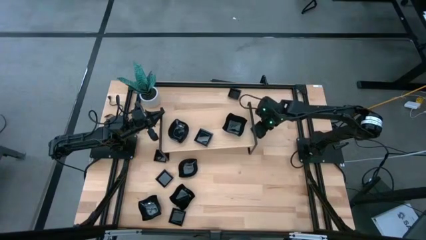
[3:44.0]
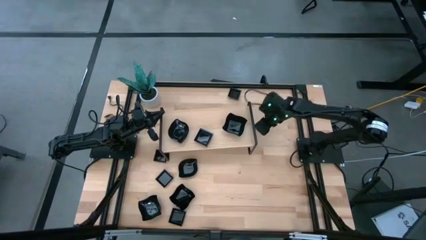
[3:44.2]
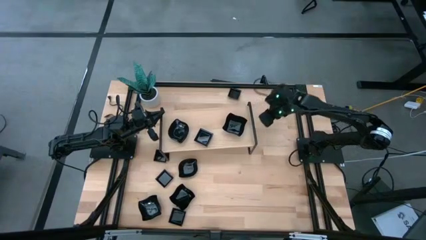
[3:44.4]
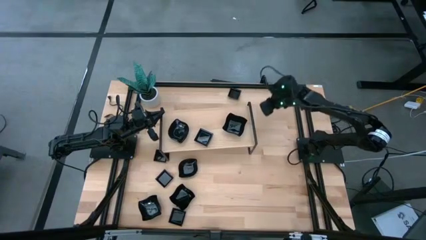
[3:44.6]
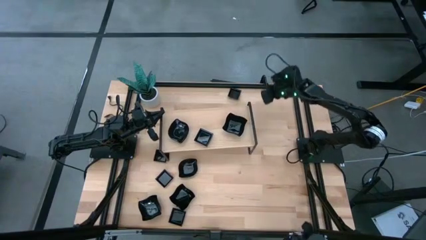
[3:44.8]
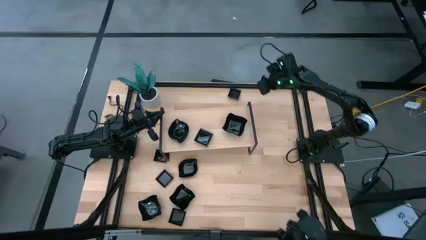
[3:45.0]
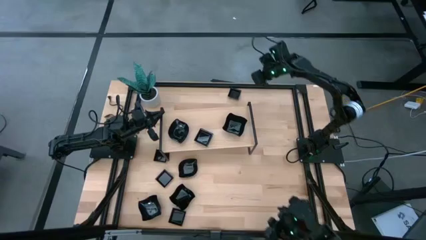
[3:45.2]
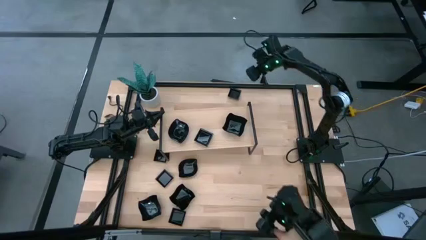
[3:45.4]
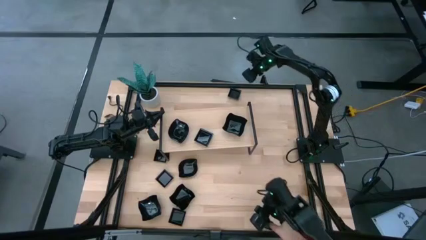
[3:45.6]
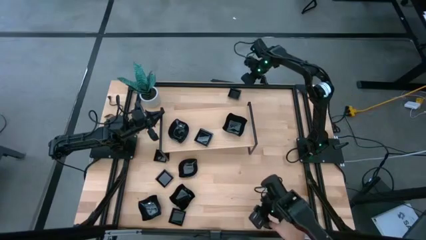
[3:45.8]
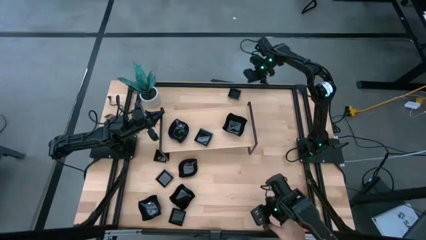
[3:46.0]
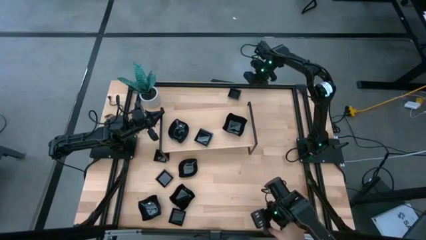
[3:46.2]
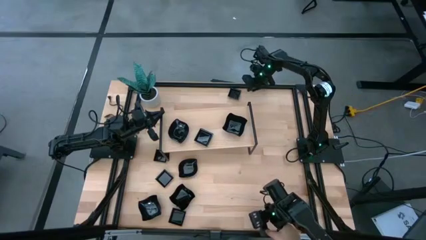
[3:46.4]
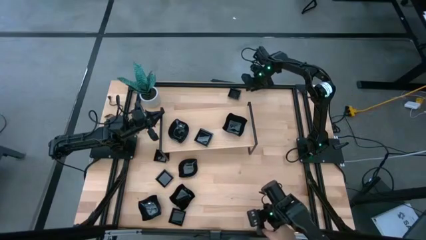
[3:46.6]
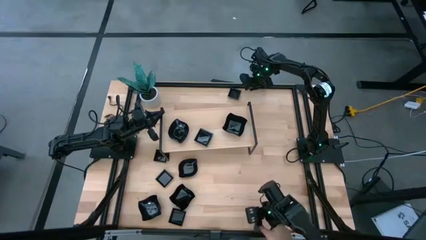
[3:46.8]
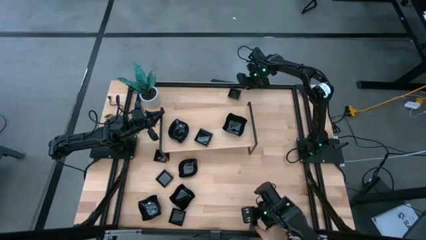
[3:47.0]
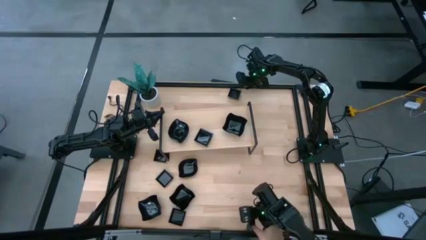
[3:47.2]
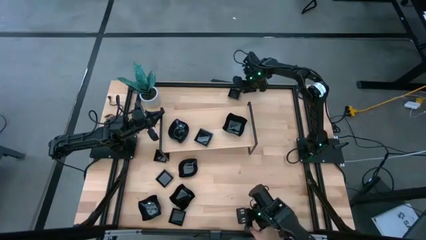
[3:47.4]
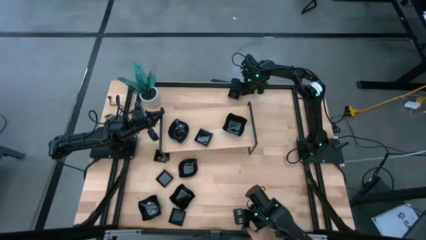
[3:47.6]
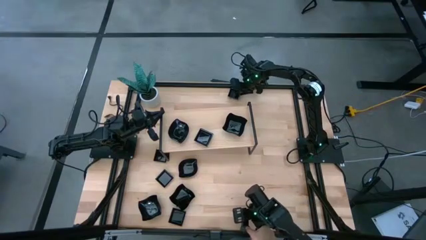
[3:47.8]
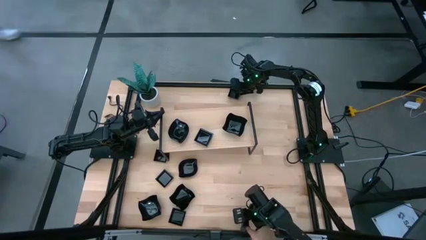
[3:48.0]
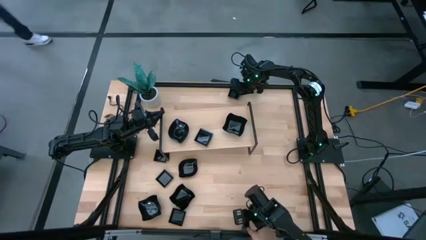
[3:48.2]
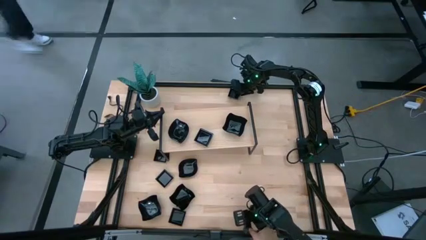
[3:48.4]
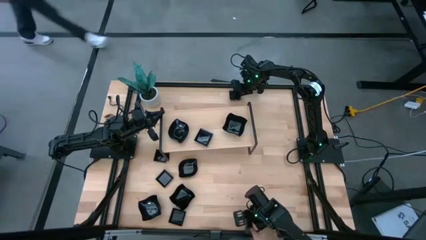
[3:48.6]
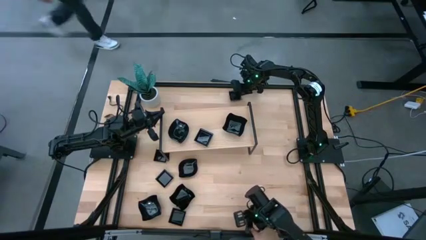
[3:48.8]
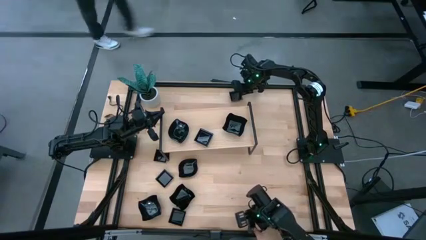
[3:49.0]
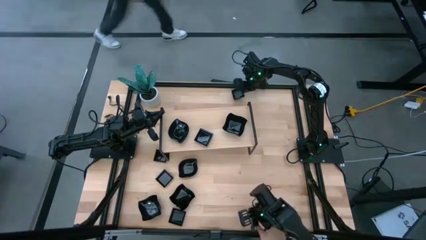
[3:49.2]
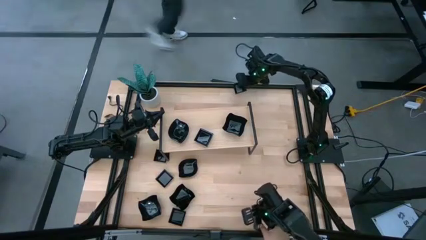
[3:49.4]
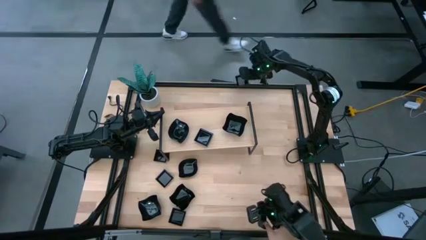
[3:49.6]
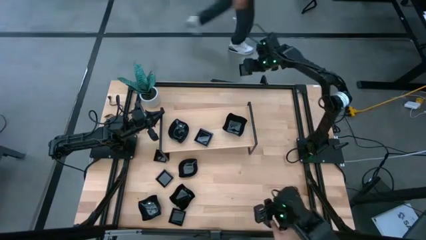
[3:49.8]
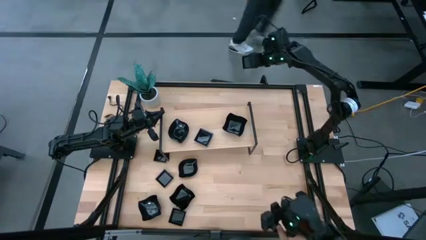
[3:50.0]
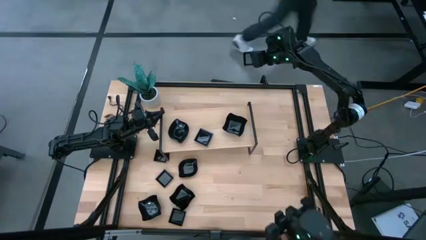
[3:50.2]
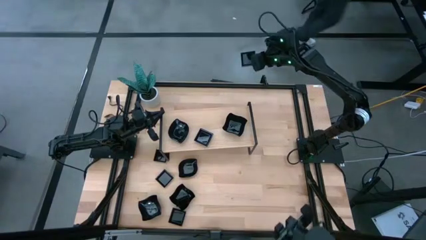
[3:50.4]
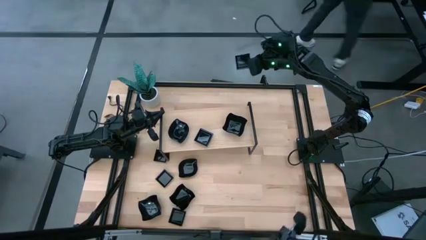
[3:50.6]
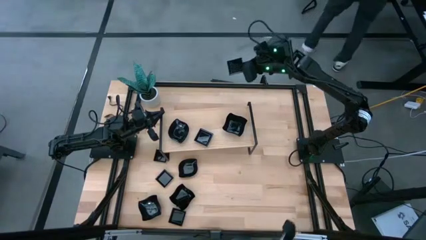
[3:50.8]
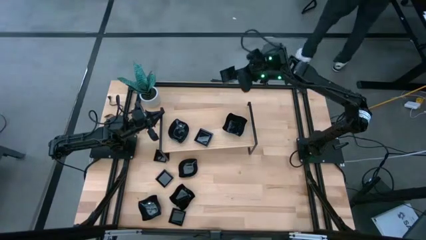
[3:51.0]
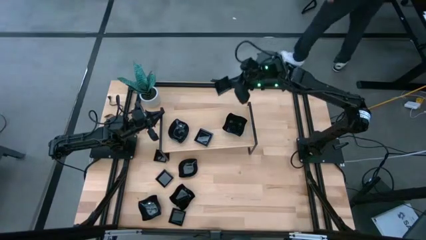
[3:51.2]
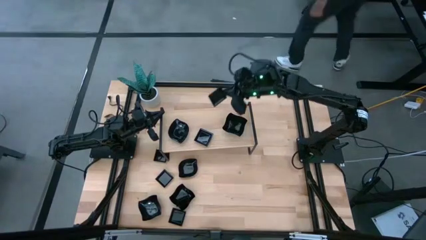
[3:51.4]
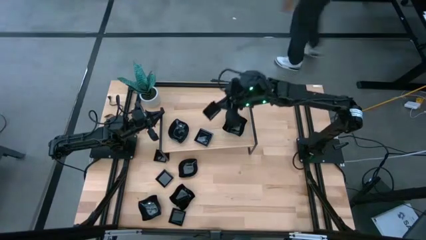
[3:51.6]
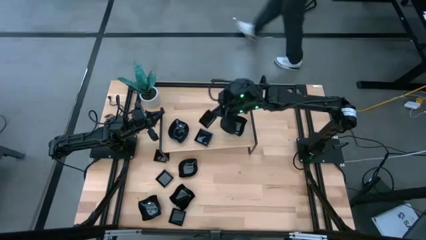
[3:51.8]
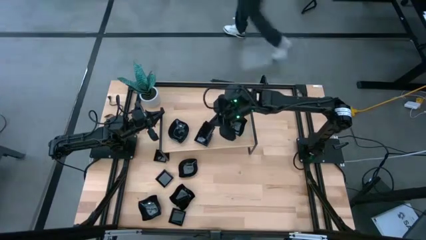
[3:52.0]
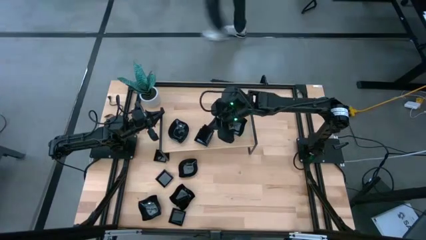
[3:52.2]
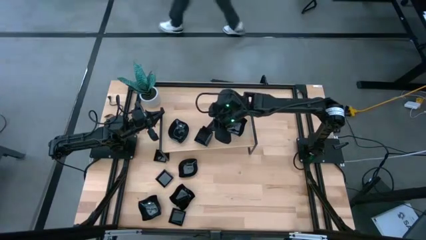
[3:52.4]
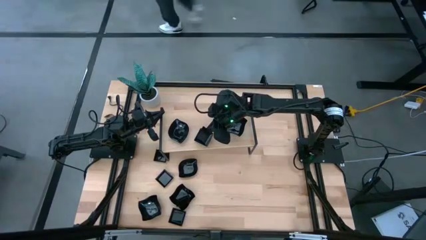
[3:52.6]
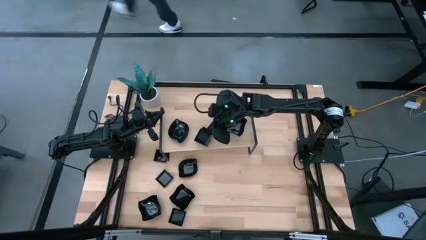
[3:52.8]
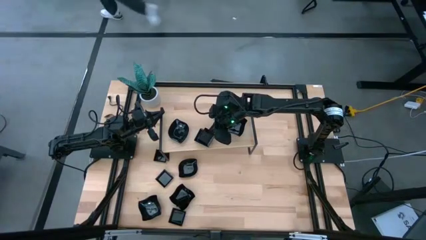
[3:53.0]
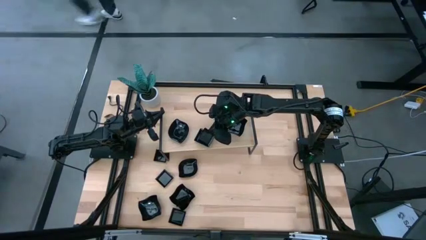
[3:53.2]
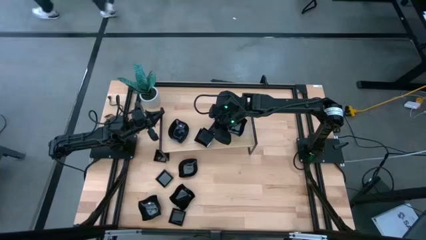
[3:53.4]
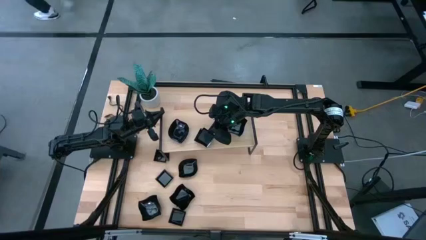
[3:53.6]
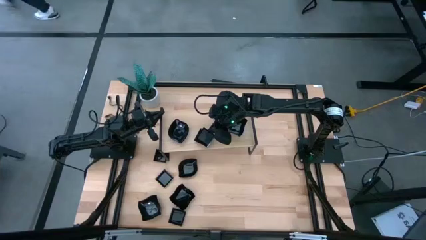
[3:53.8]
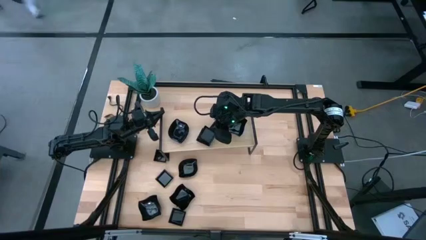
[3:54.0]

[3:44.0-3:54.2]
Task: Pick & Place Mini shaped plates
Stack the black square plate on top of the black square plate on the shelf

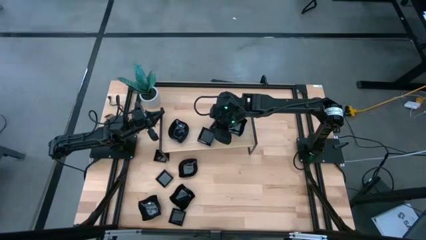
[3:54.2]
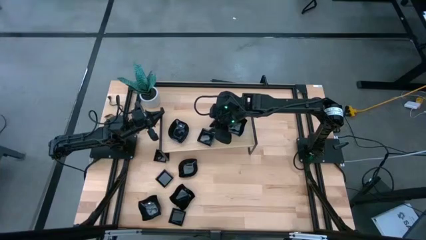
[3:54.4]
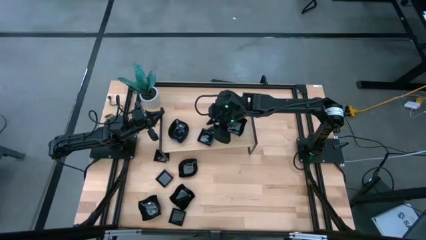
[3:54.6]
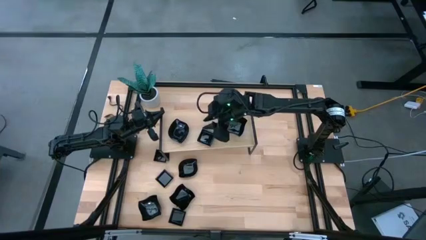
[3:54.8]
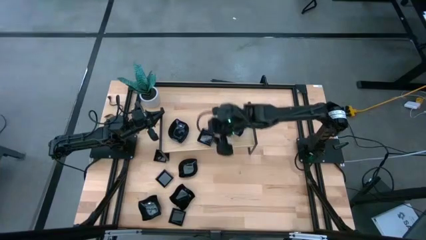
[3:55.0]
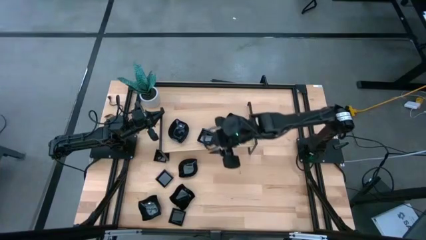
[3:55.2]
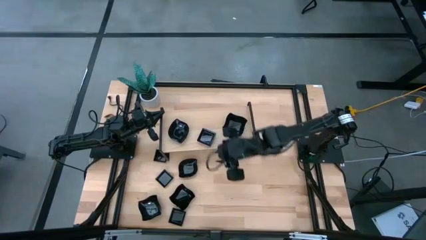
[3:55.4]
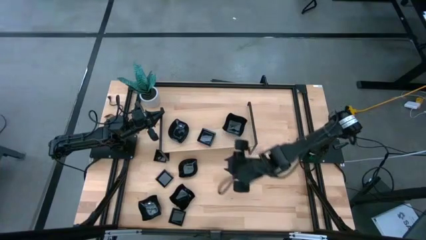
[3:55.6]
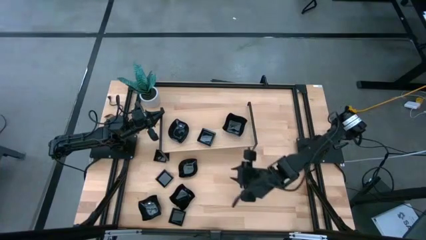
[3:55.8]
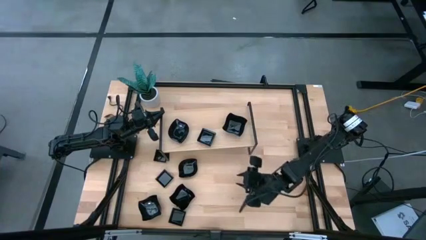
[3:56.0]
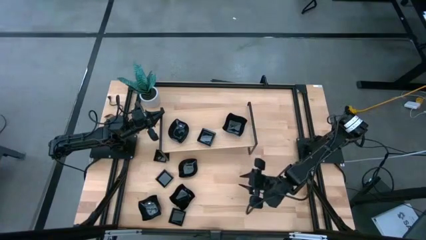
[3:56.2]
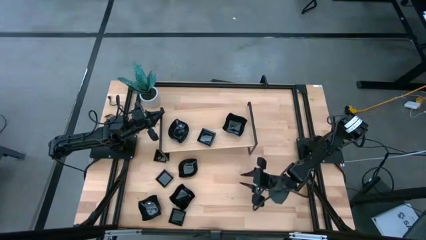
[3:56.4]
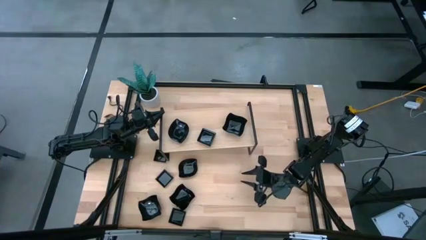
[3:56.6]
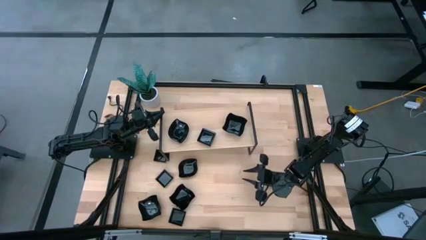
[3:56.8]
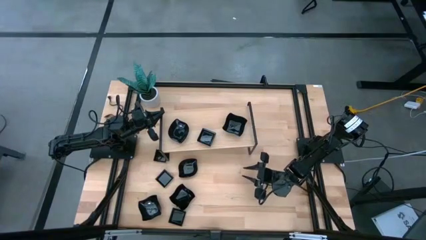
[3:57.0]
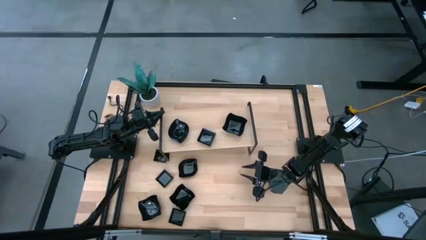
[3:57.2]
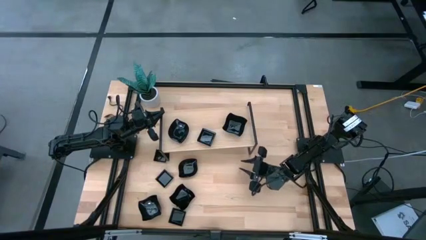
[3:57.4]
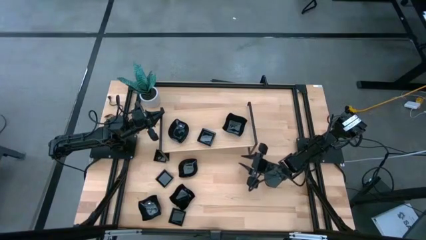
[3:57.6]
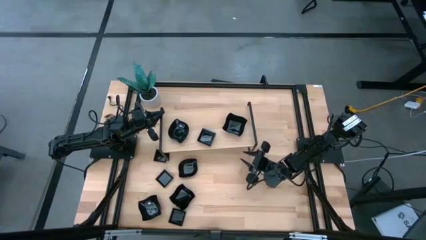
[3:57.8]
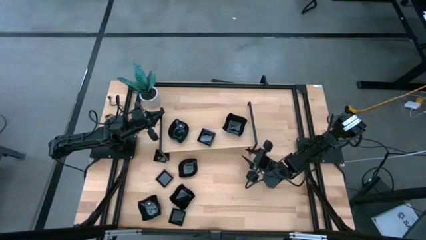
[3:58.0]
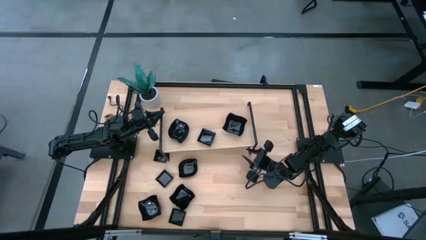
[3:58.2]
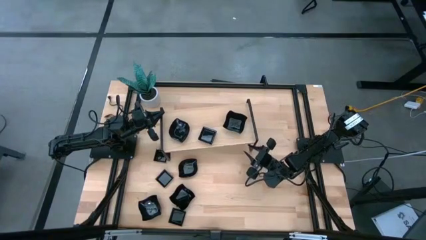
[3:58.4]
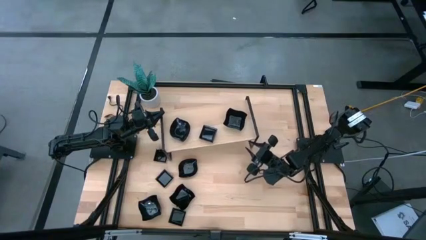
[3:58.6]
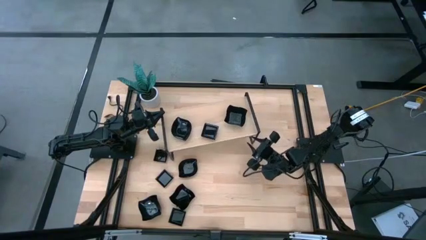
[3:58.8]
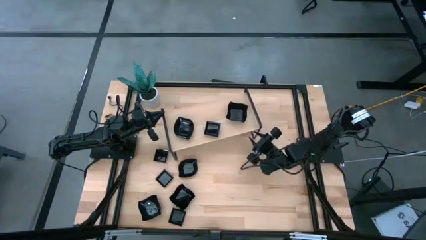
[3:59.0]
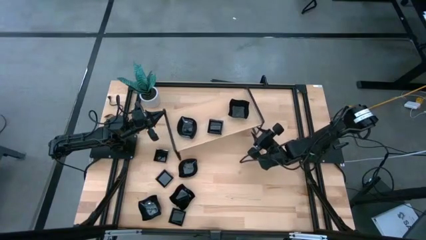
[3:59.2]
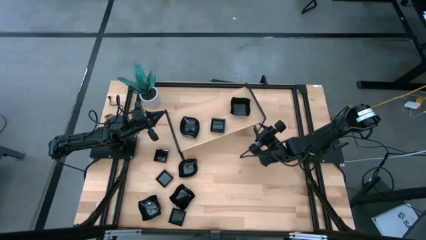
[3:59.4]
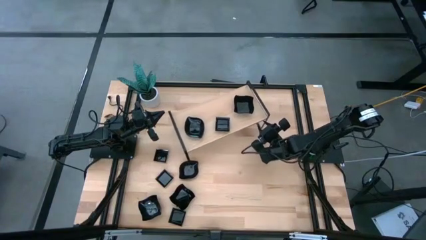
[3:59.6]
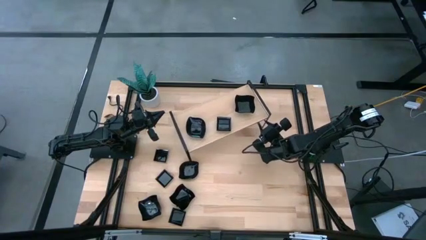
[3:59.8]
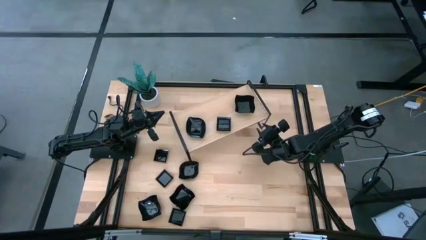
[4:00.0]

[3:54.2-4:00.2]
Adjust the shelf
